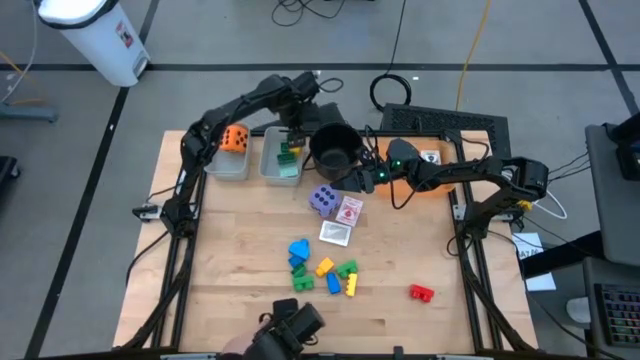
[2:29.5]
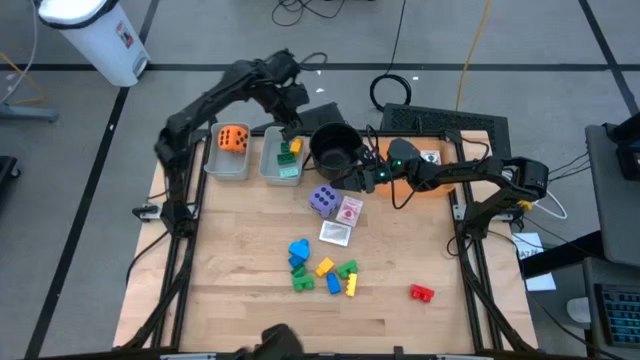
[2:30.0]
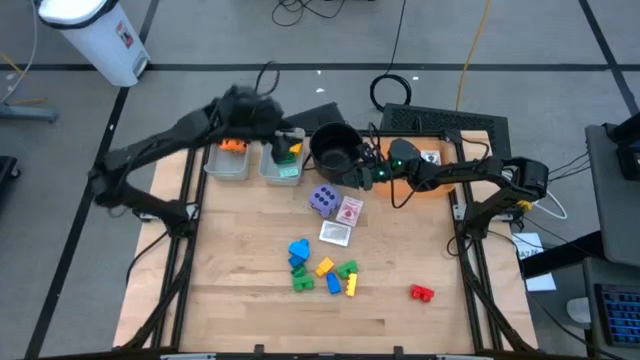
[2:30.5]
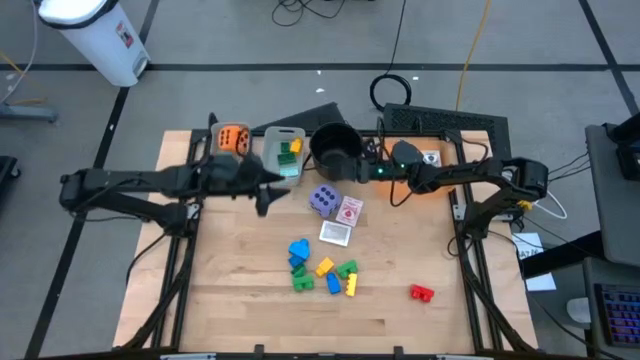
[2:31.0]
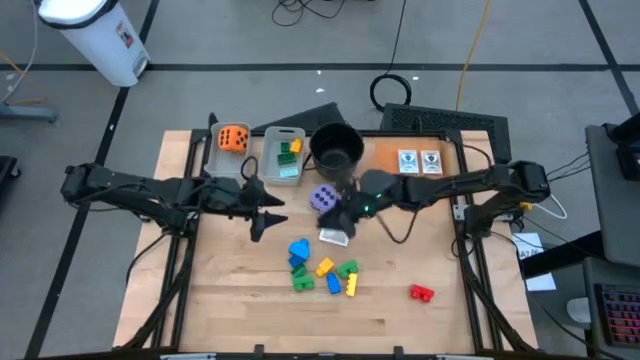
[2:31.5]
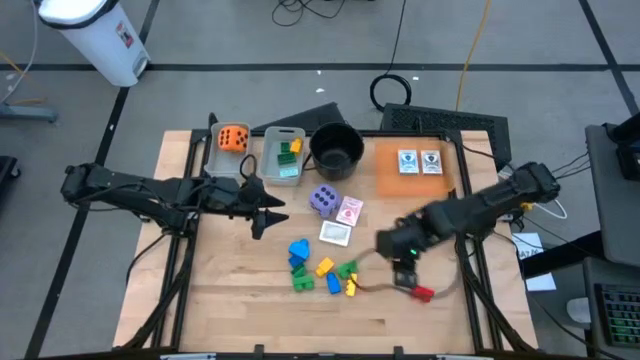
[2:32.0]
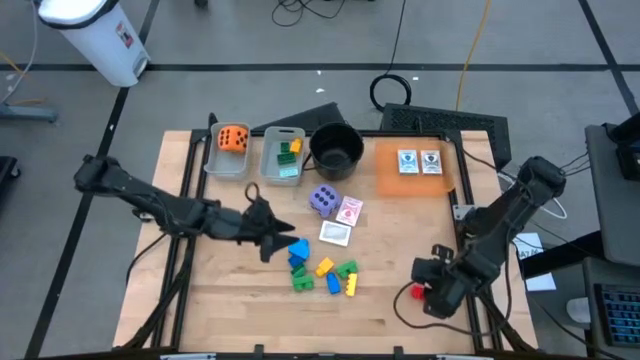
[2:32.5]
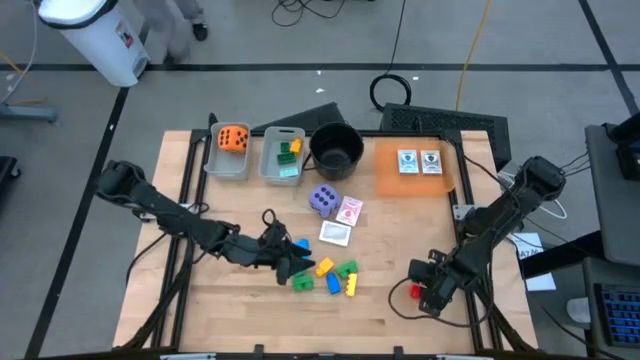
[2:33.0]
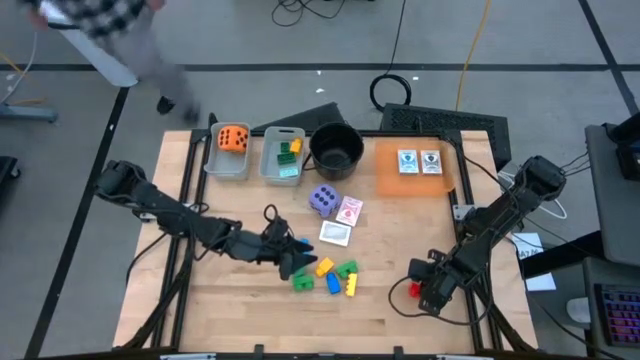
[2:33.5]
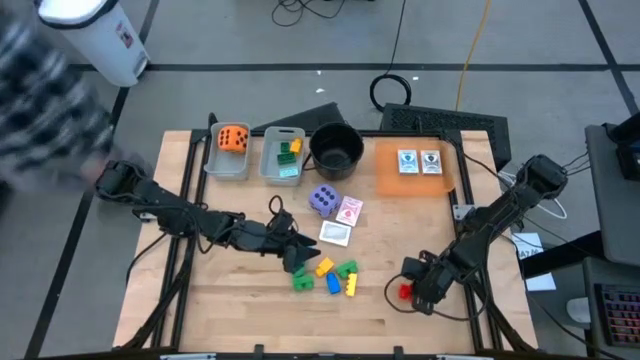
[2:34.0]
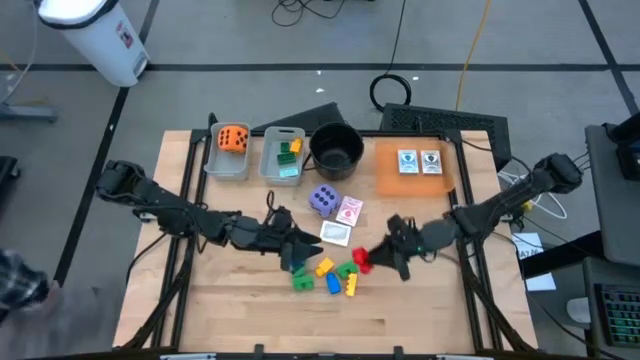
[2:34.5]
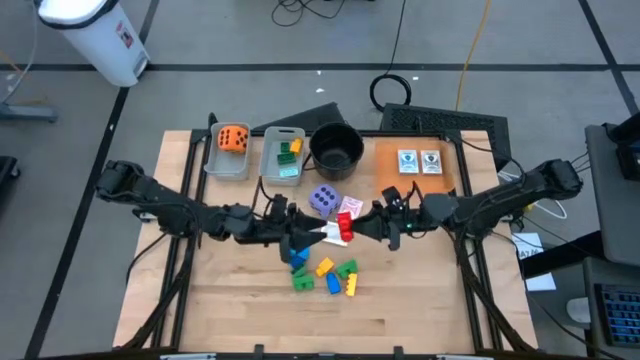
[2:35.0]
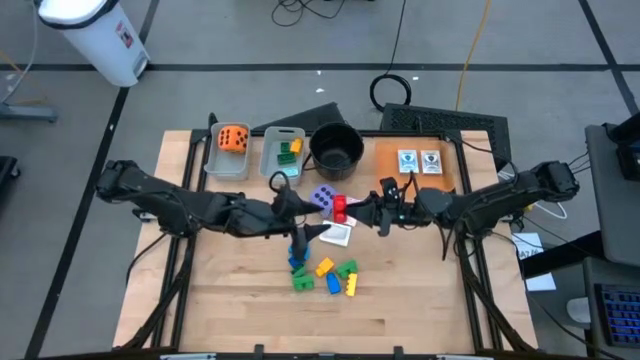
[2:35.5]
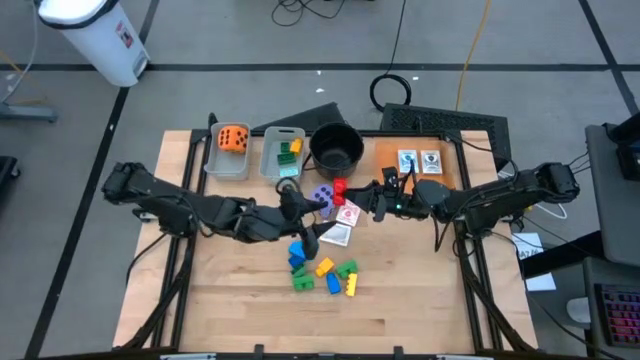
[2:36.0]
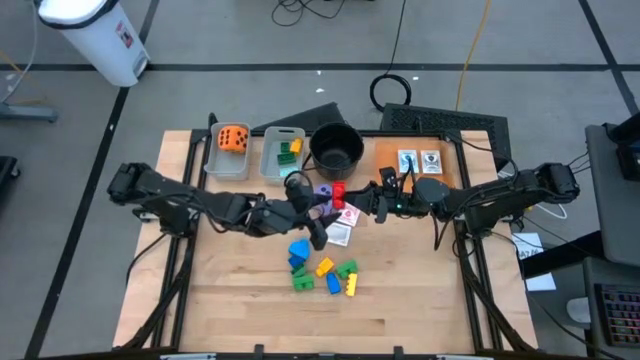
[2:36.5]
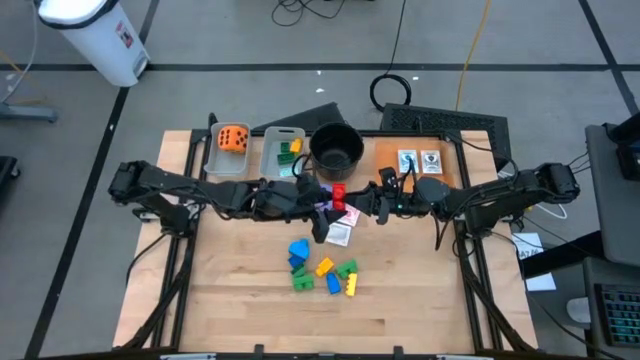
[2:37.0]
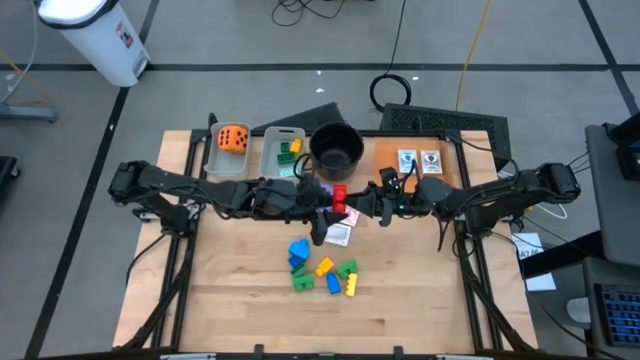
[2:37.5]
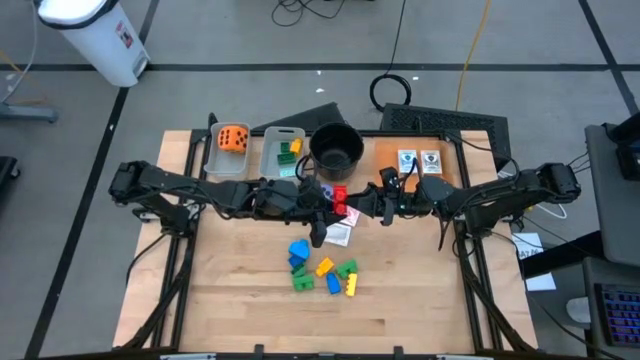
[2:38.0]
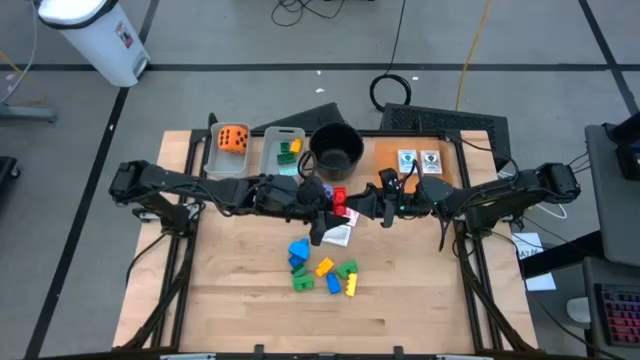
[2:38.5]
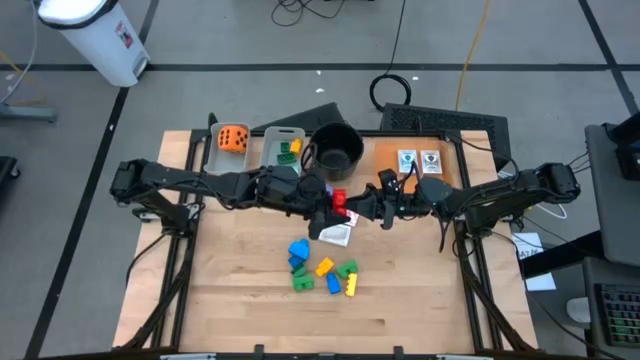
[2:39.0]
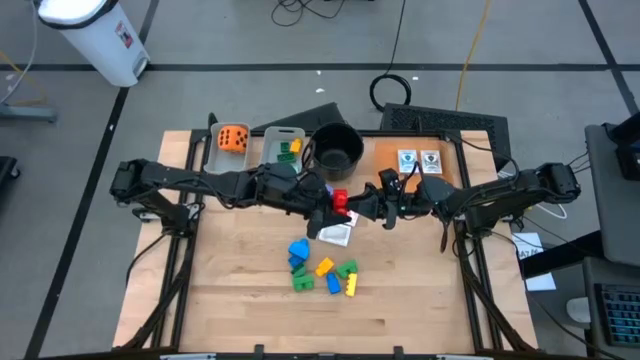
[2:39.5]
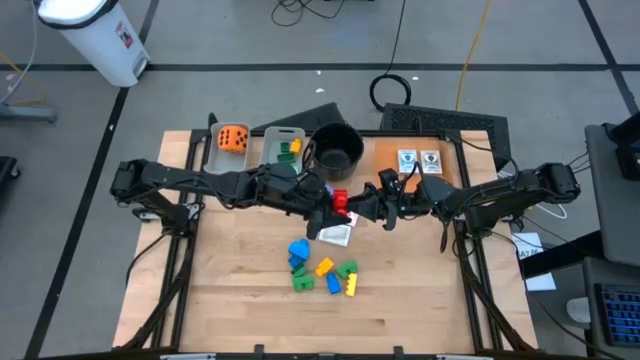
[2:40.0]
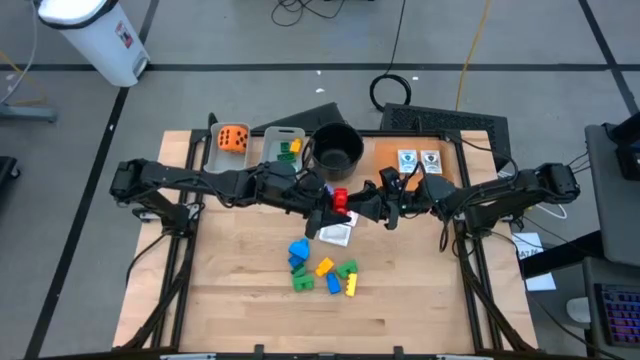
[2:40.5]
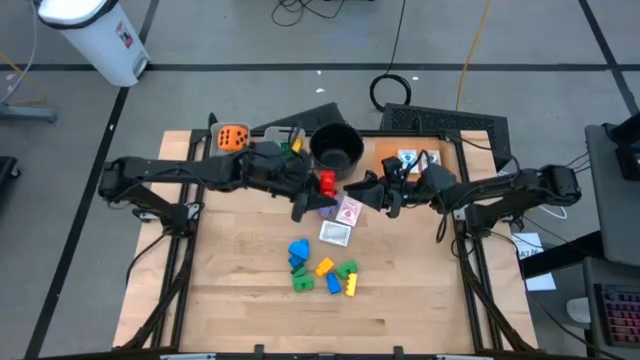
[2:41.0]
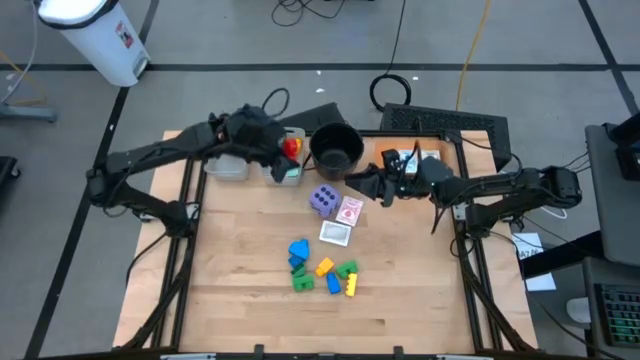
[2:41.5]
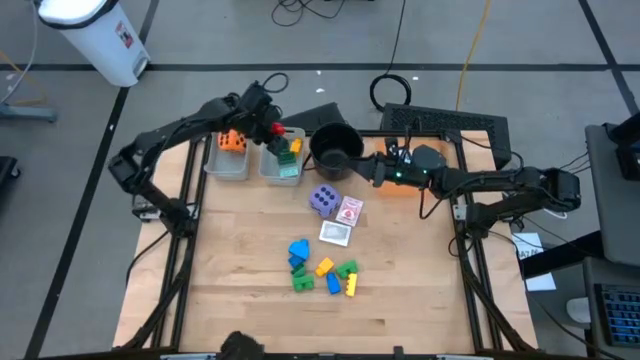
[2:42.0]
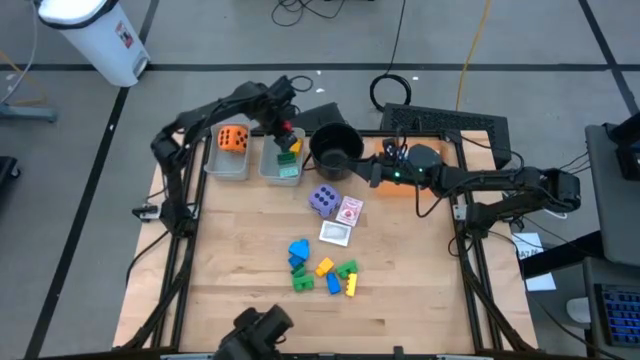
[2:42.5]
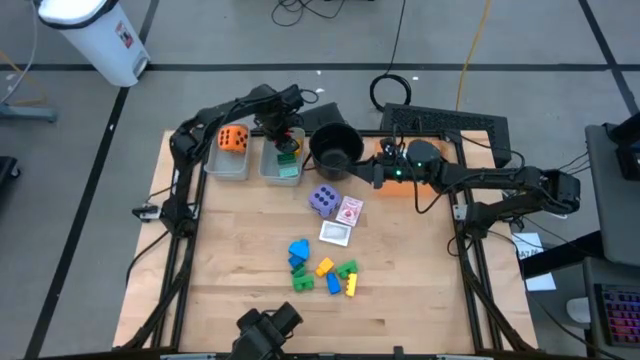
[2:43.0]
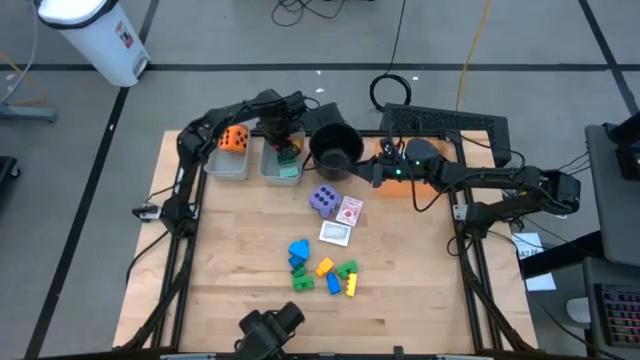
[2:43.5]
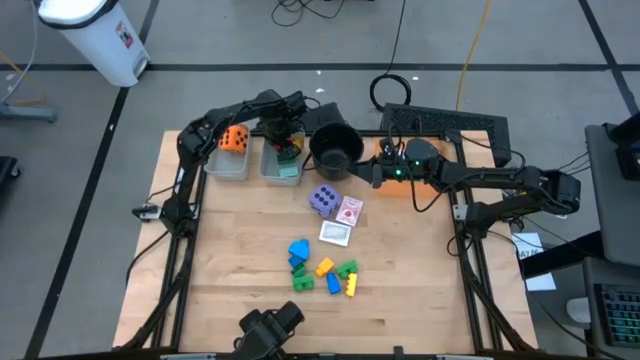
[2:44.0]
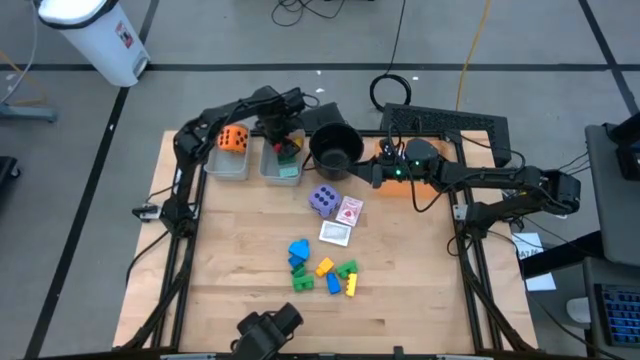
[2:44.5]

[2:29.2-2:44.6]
Task: Pick & Place Toys
Put the red game piece into the right gray bin

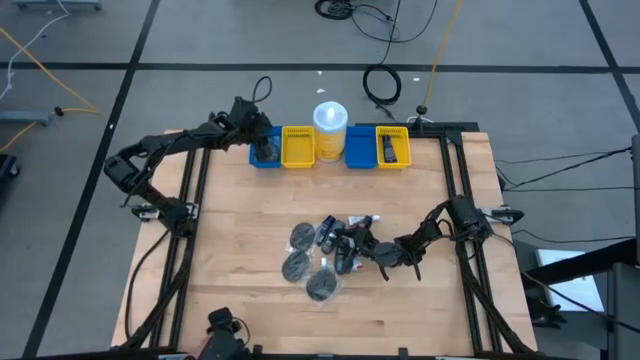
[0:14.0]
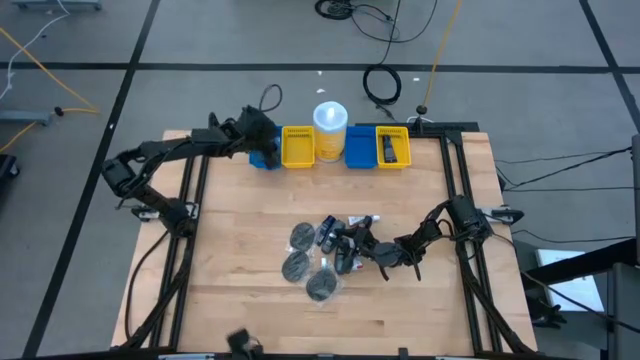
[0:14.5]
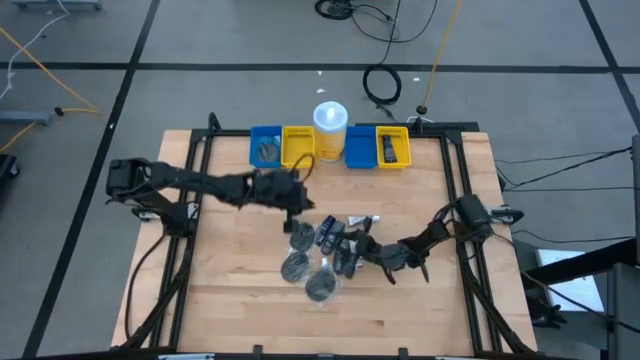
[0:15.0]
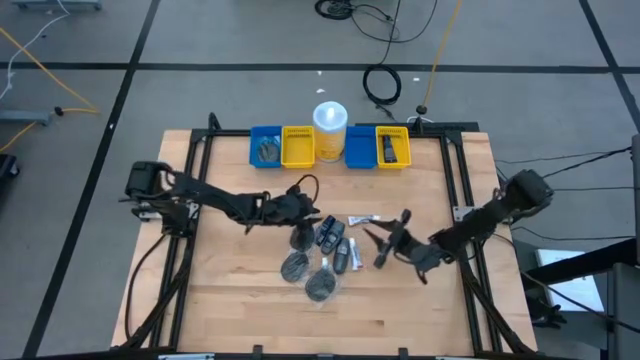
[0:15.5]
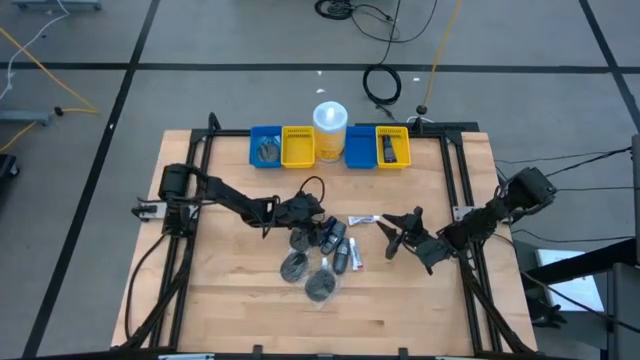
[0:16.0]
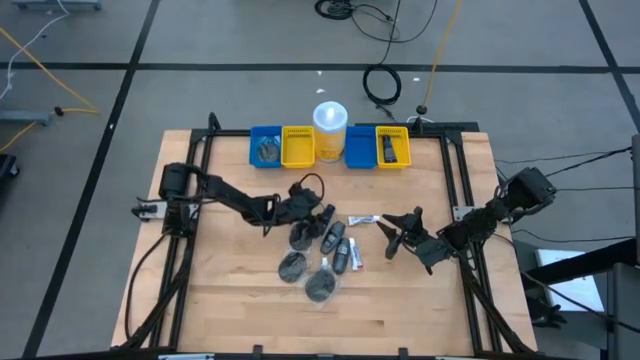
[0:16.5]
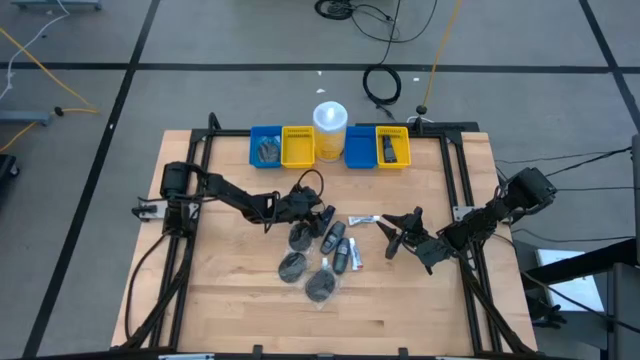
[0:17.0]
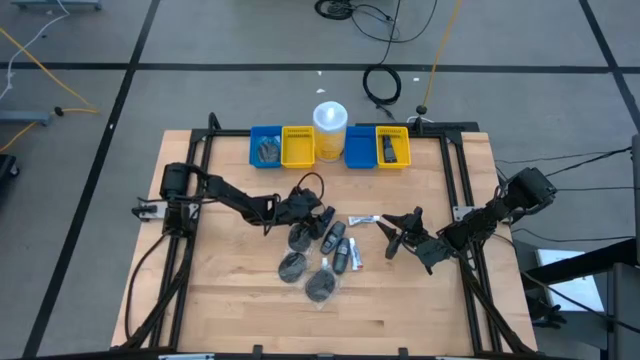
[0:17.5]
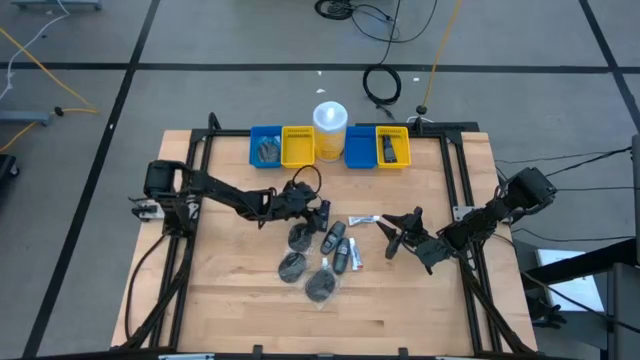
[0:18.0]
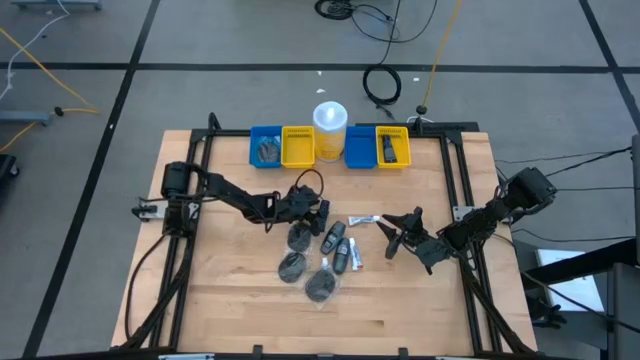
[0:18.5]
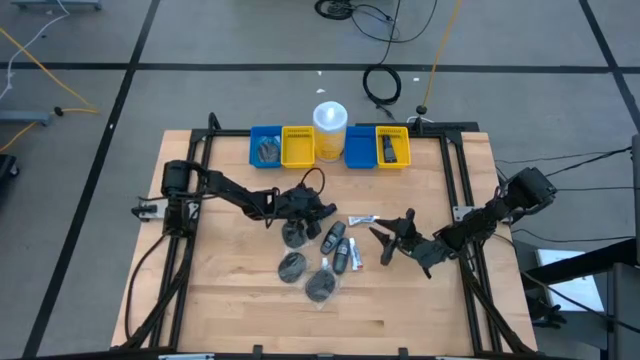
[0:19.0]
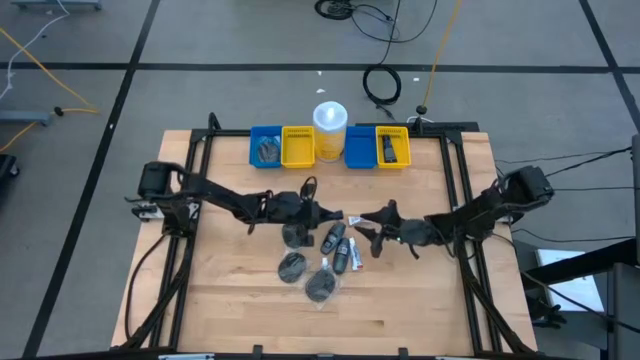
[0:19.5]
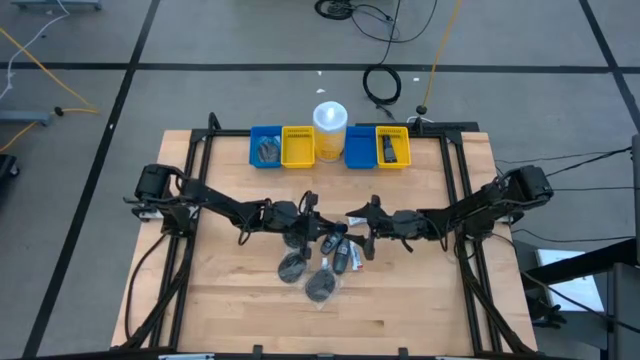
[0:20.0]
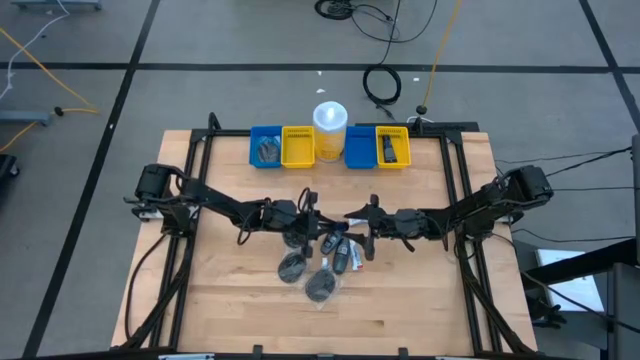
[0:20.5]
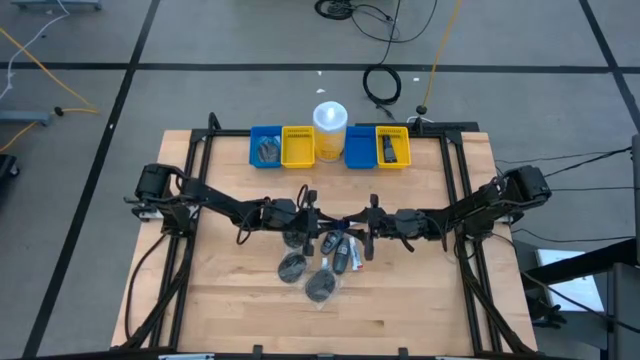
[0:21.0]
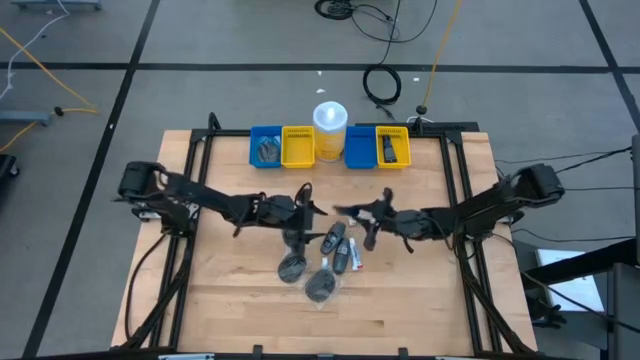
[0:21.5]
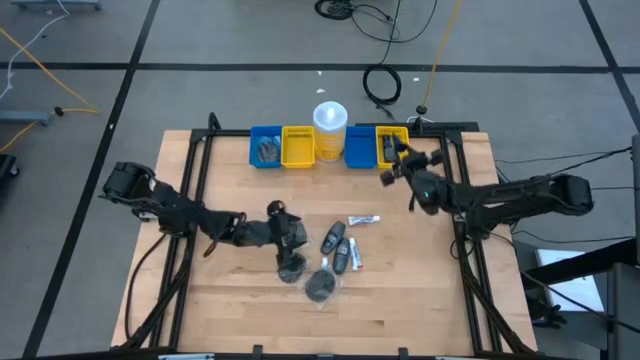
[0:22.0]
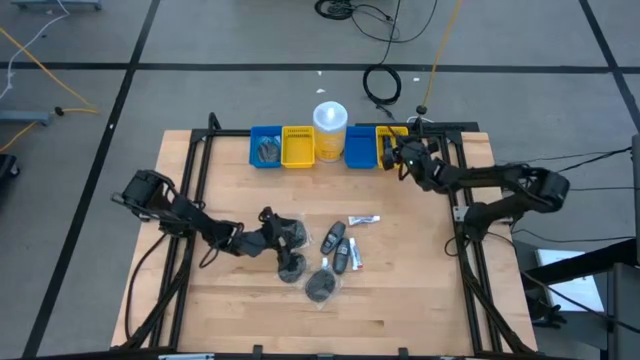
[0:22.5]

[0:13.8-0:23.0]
Task: Pick & Place Travel size toiletries
Put the dark blue shave cream into the right yellow bin
